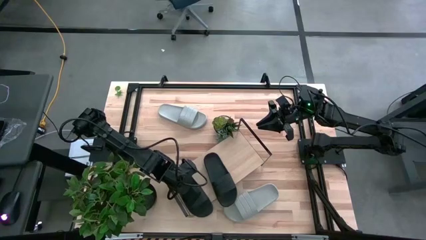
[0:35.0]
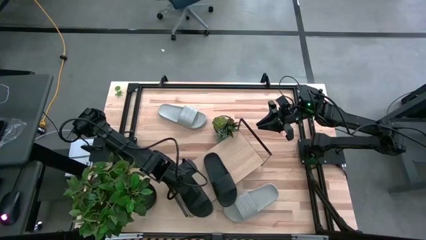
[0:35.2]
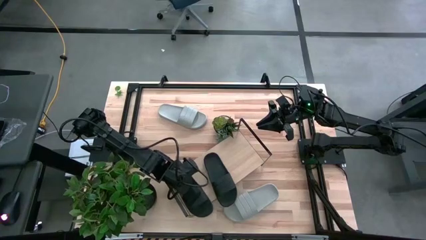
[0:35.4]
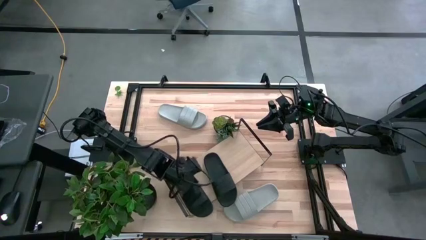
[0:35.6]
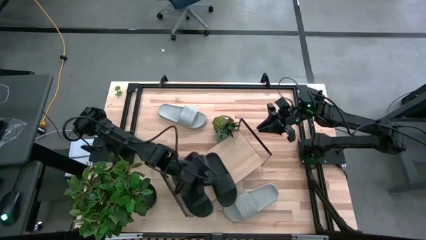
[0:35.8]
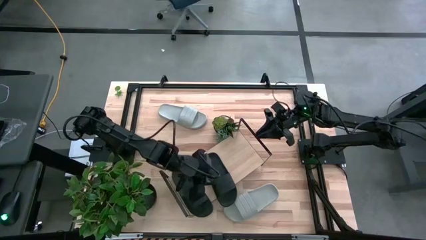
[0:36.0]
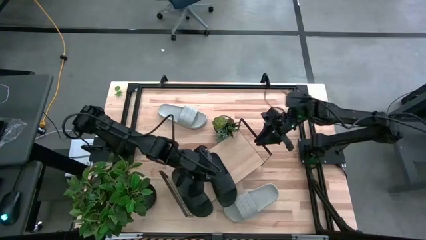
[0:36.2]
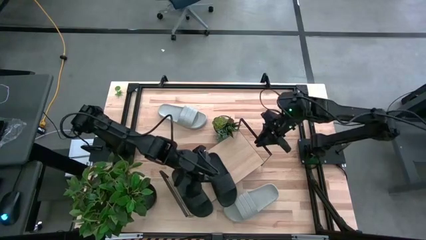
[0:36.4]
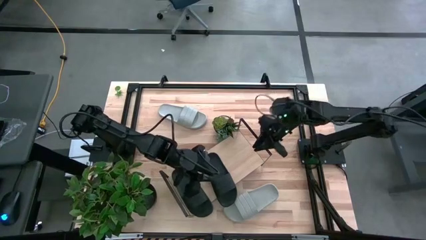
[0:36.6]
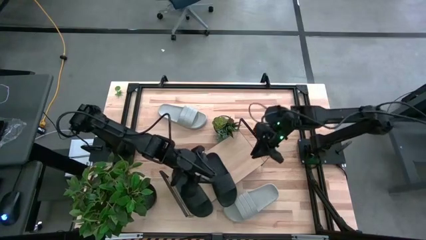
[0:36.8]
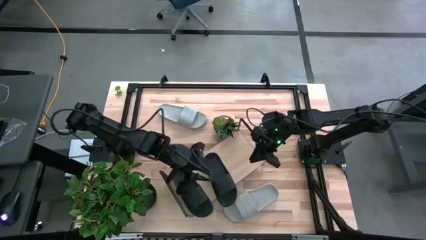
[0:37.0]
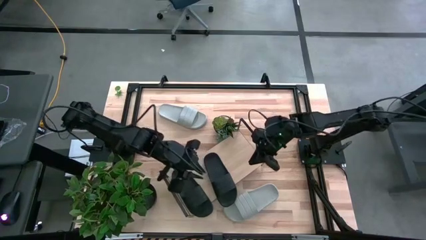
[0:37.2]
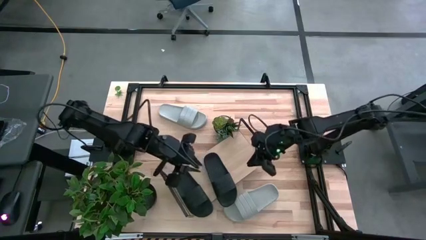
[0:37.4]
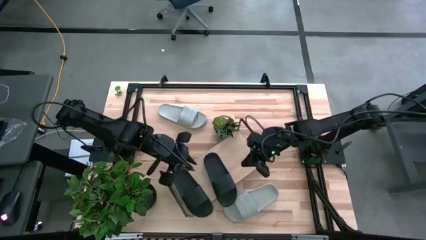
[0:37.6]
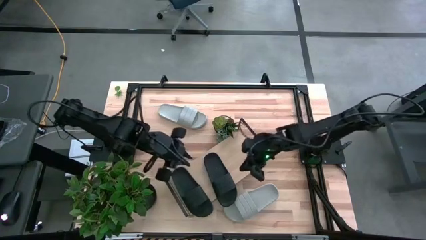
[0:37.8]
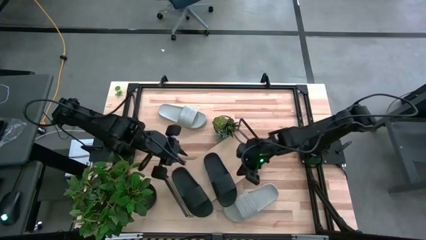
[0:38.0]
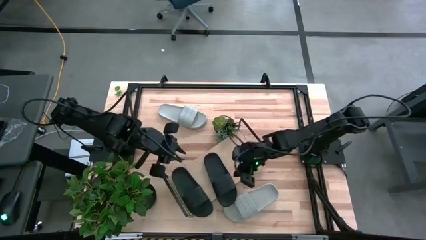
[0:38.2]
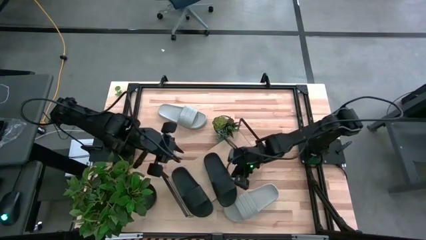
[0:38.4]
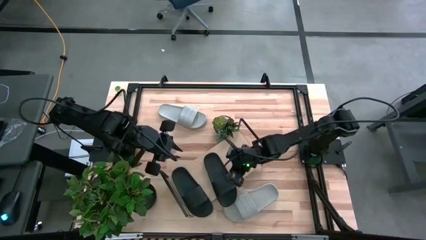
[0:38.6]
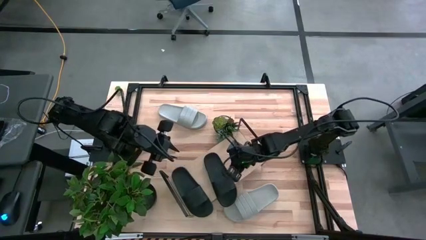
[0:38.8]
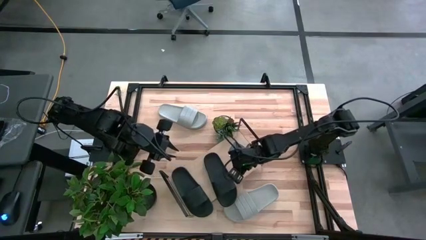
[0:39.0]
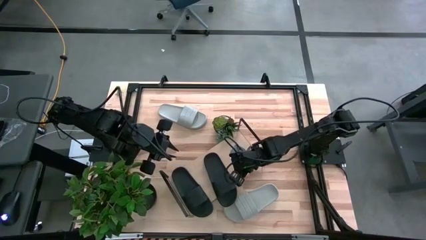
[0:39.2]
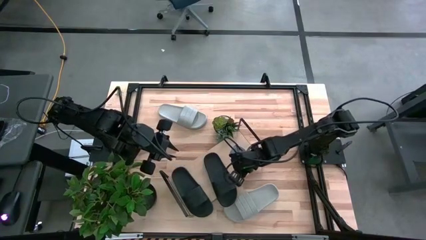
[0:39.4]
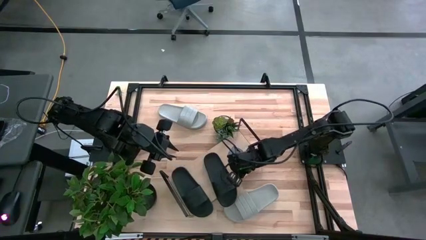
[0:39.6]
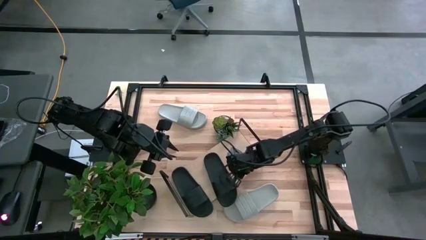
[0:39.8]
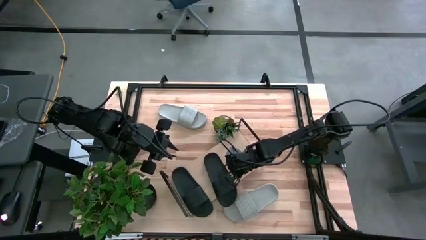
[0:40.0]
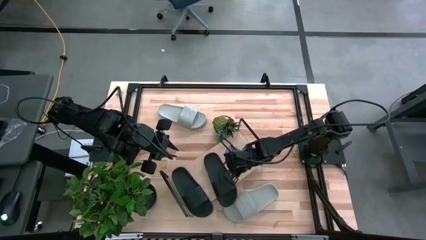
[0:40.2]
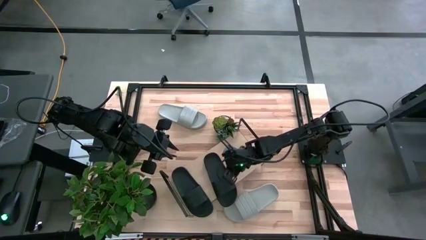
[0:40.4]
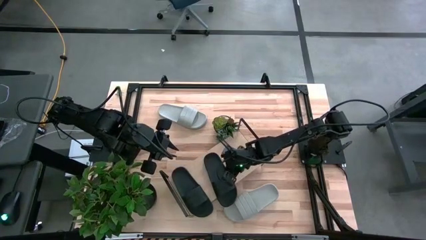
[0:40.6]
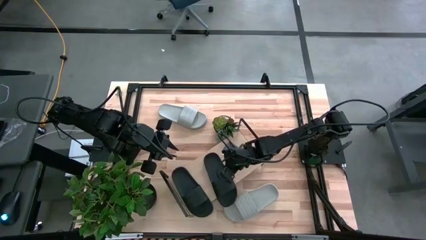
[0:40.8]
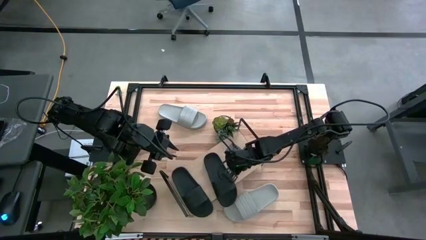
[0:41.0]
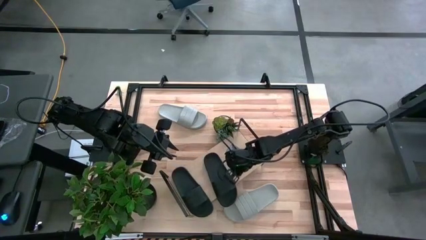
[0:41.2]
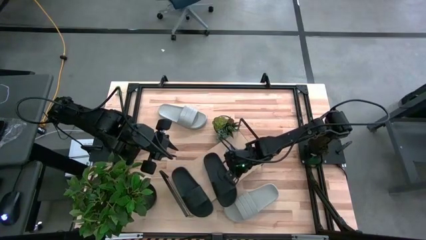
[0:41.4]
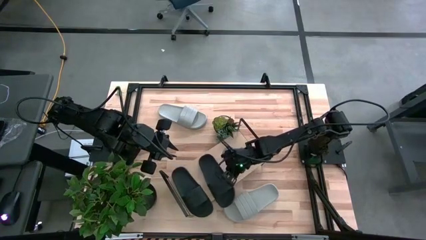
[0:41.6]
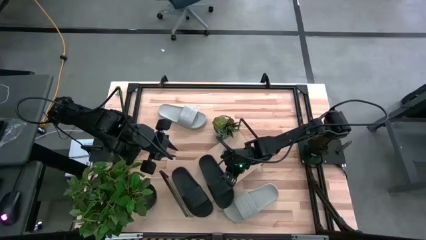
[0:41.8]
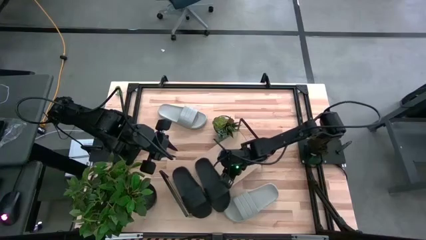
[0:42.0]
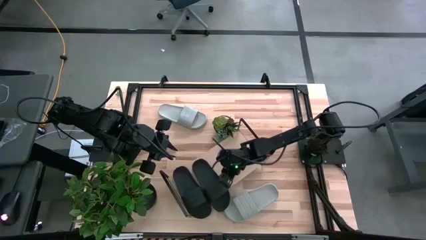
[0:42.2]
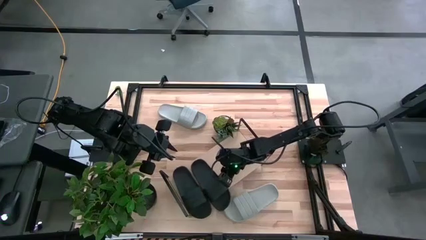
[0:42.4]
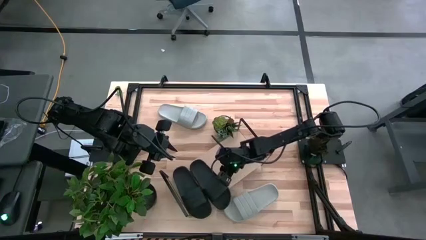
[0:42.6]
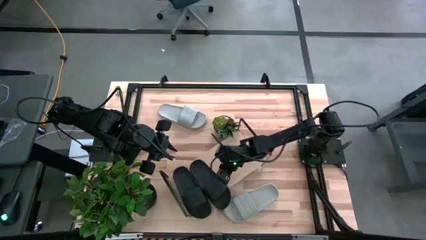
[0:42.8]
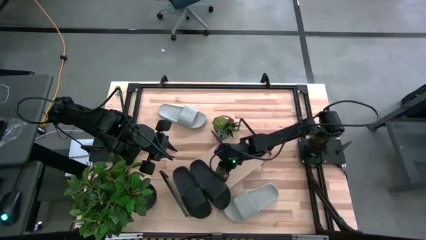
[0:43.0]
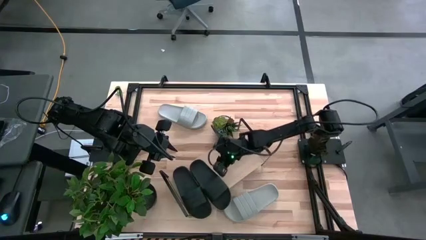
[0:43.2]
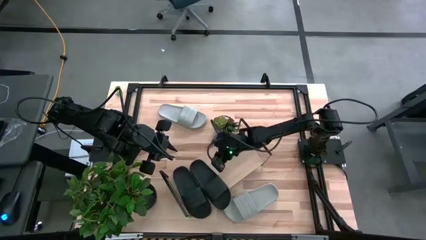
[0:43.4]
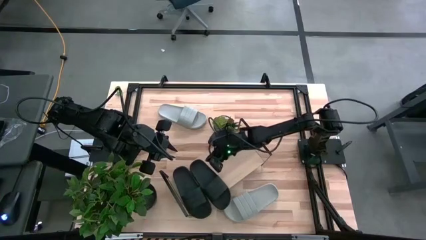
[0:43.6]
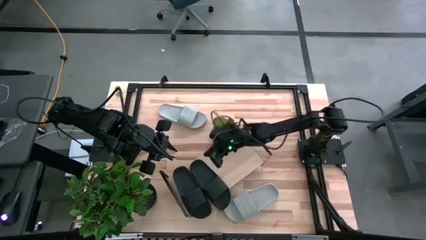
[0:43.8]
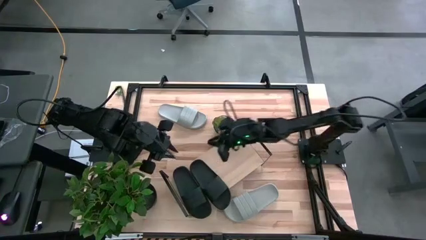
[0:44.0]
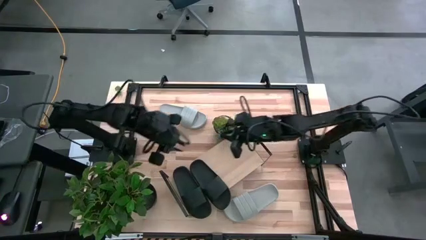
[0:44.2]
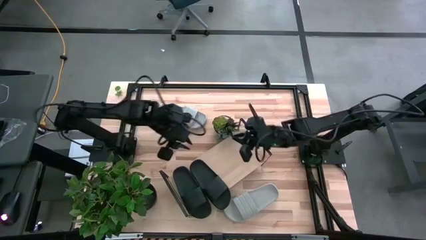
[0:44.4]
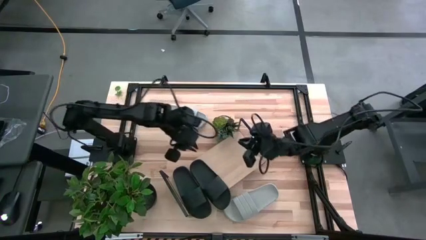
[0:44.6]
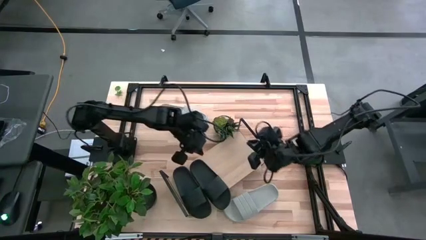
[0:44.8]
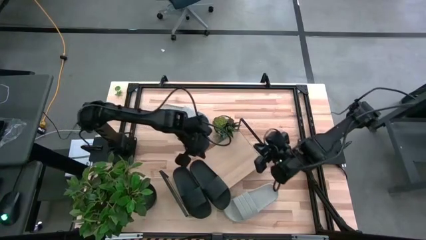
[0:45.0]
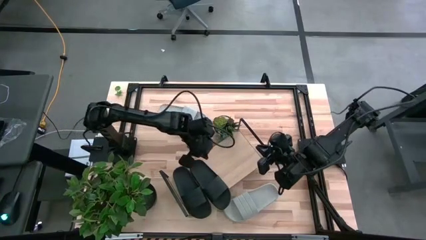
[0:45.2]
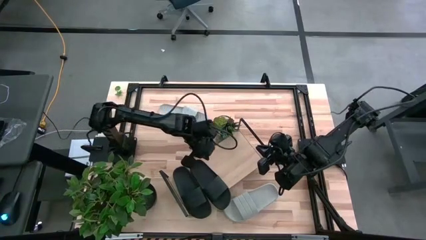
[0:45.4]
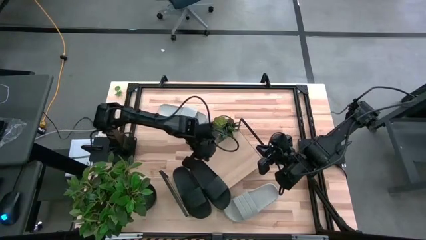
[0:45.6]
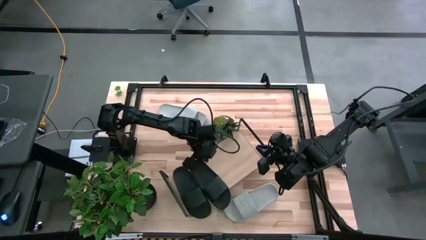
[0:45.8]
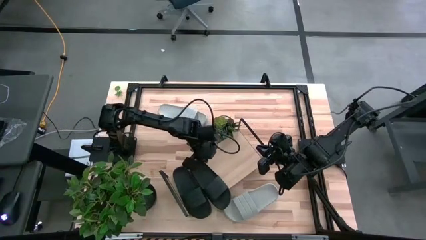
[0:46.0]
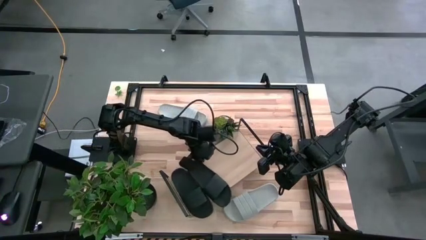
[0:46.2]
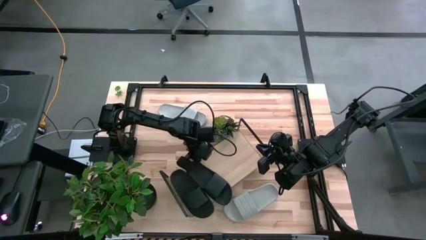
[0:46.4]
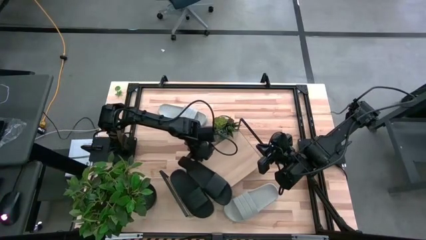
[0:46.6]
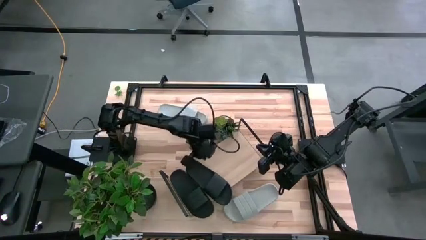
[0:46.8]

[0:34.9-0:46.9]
Task: Pick and place slides into the shelf
Adjust the black slipper
